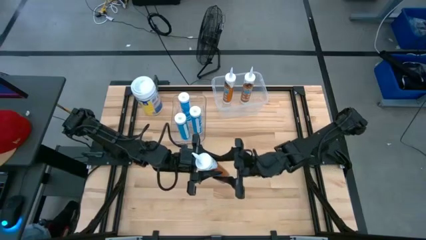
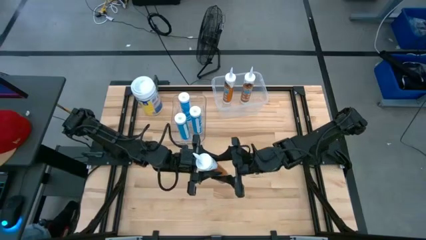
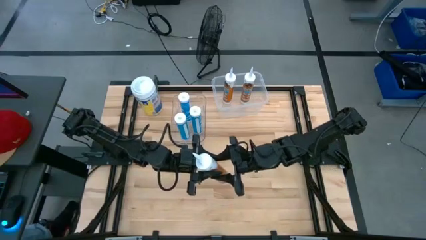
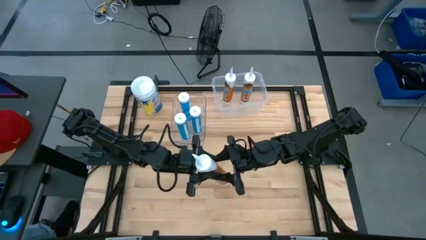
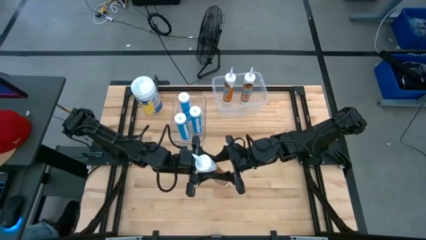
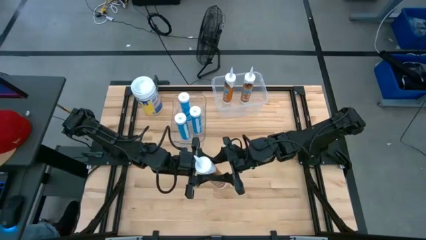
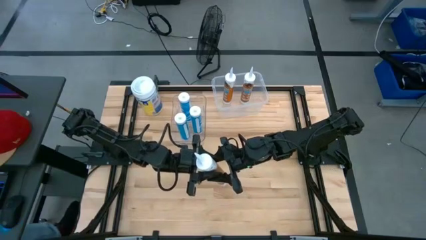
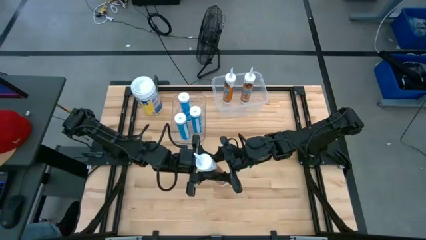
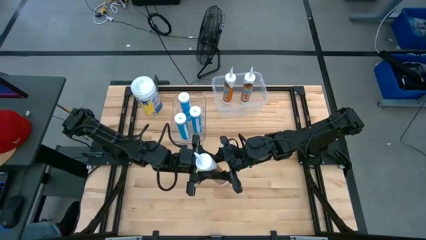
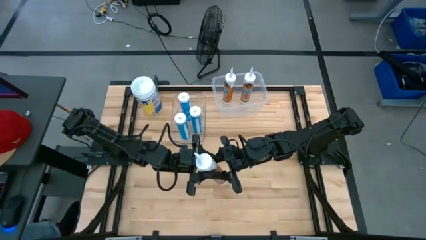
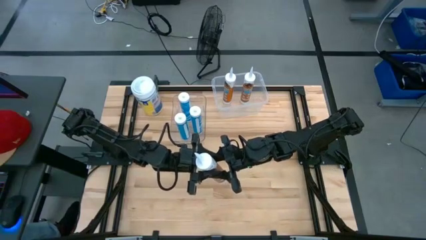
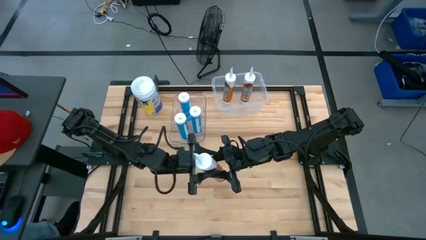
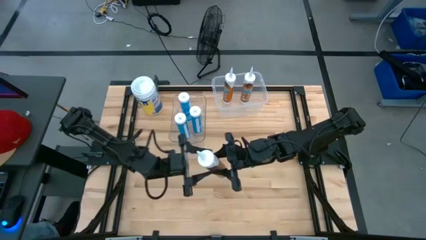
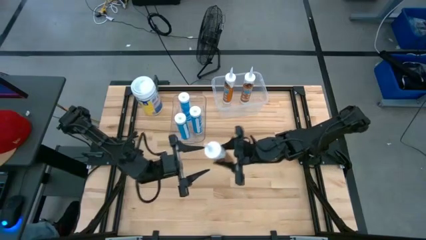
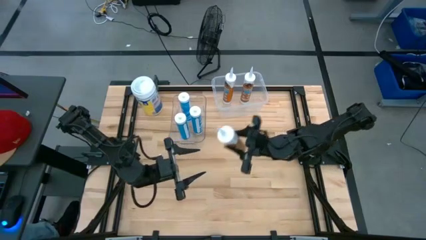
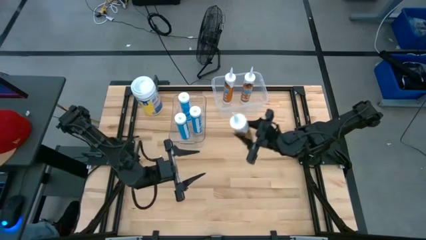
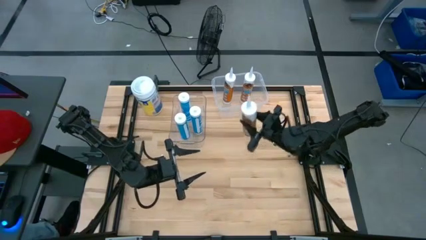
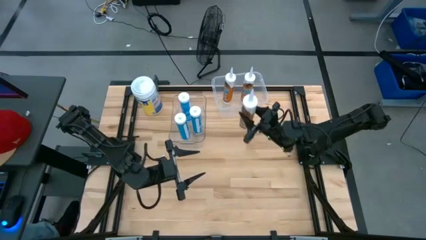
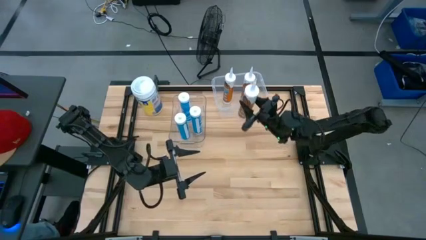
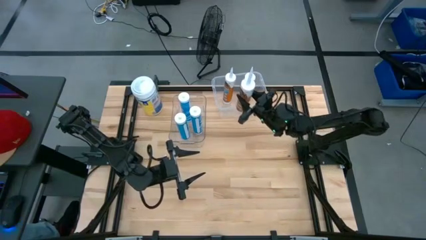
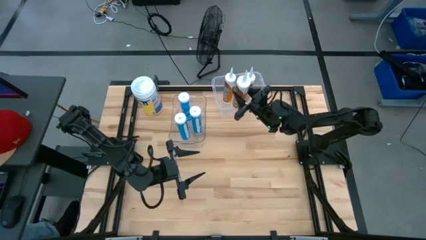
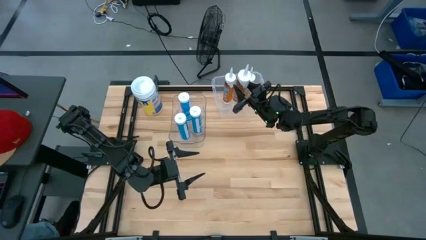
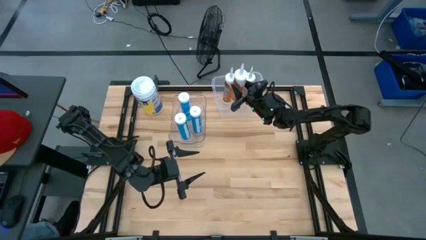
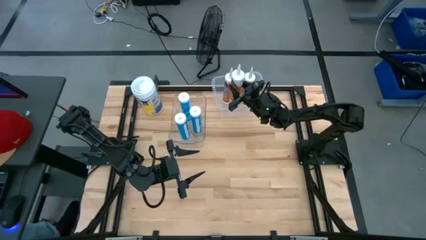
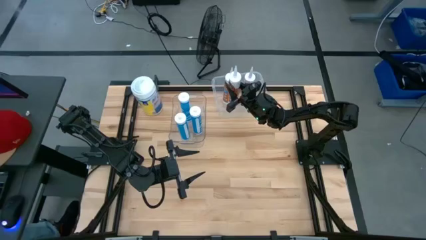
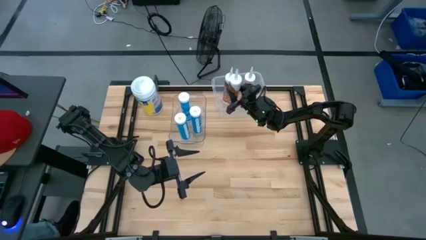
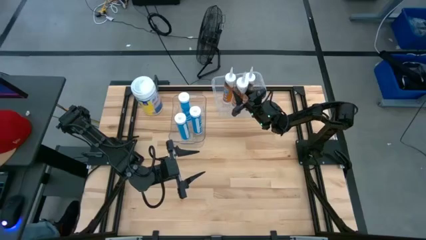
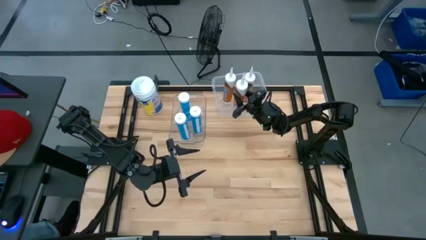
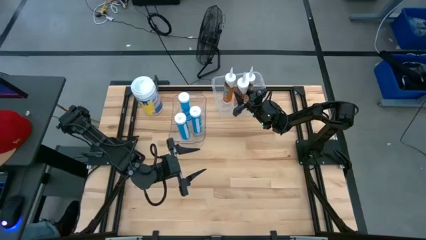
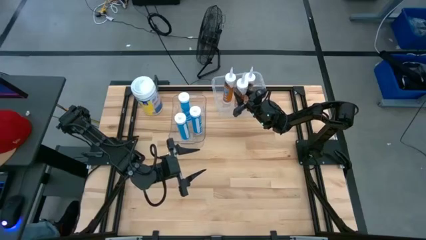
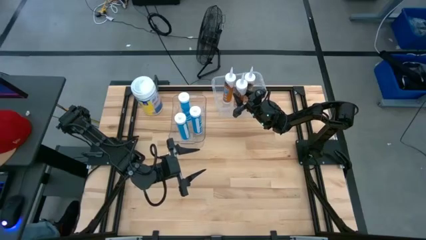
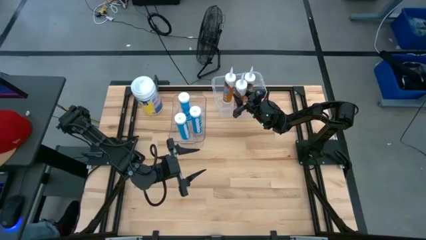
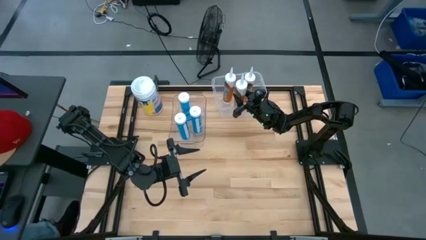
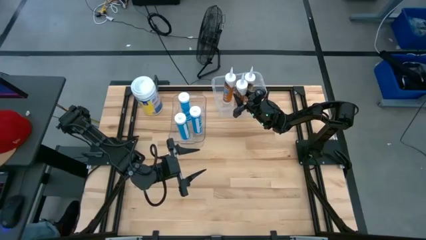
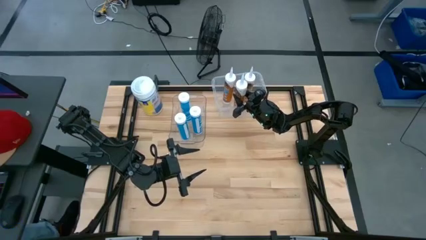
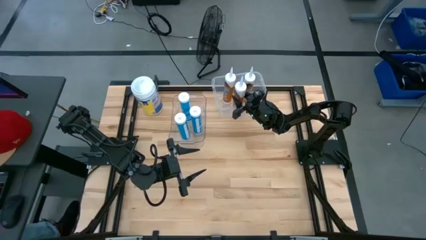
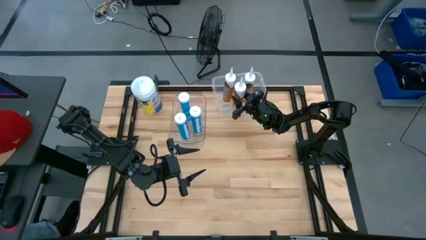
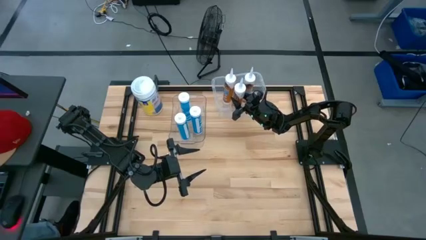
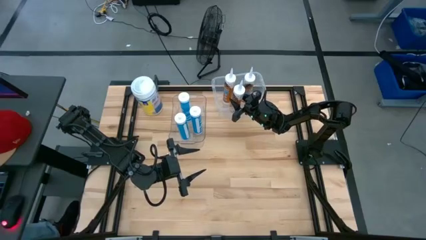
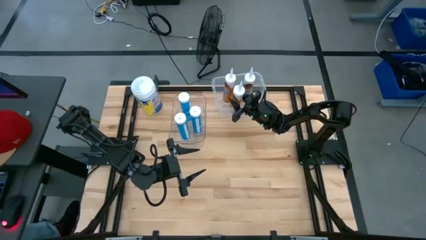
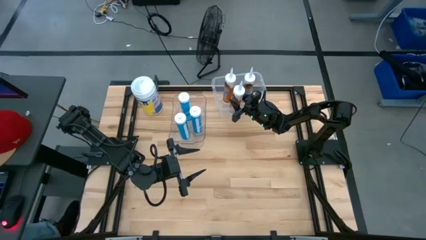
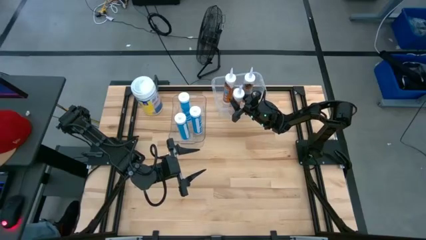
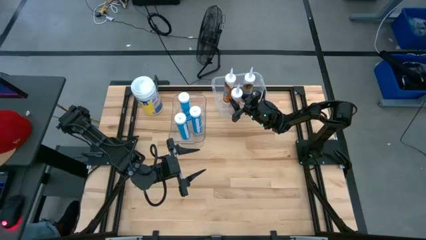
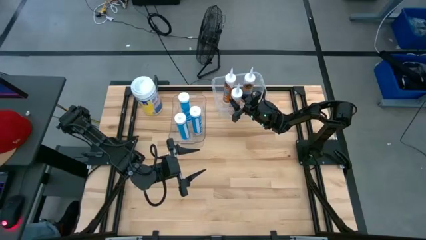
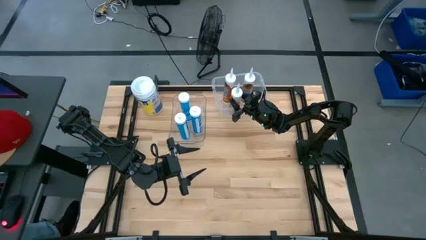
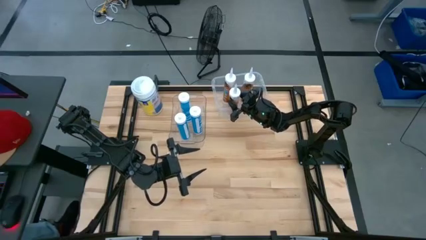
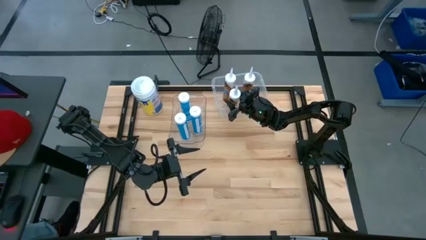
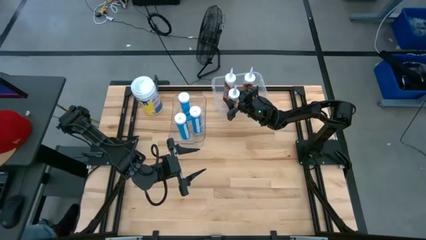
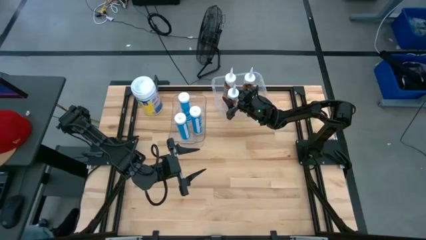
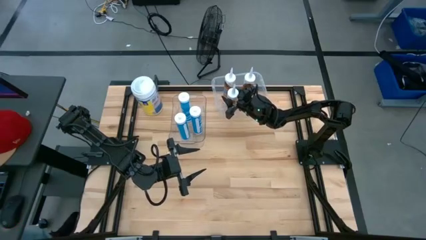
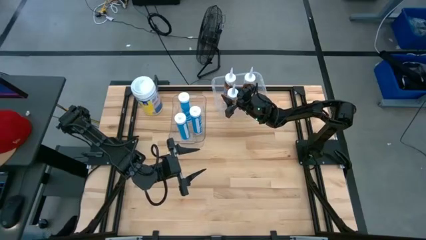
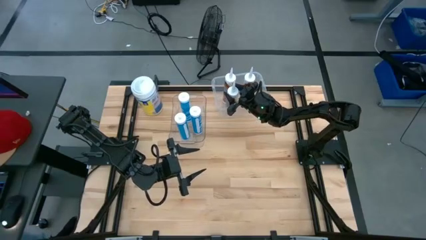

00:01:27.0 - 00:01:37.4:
Task: Pick & place silicon tubes, Sealant and Lysol wipes
Put the orange sealant into the white bin

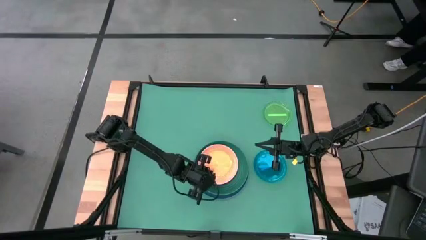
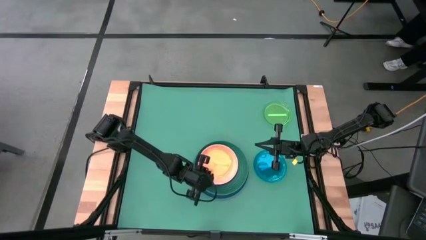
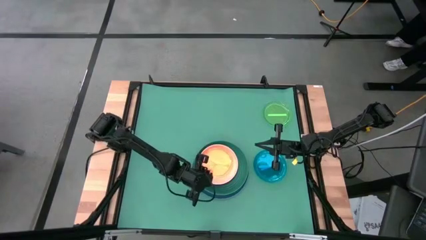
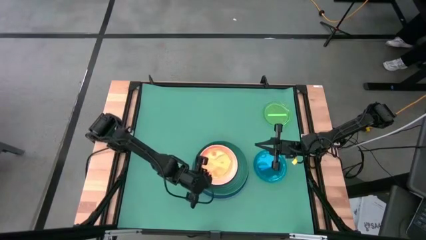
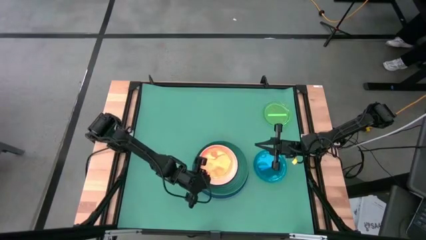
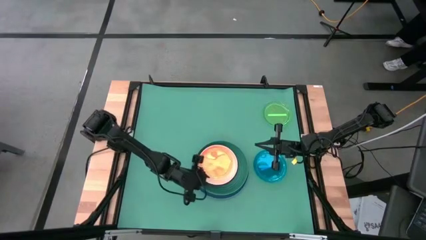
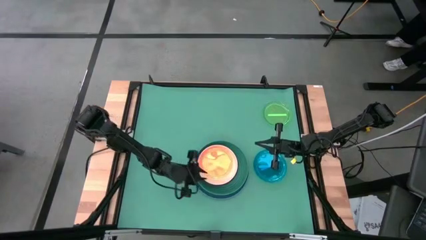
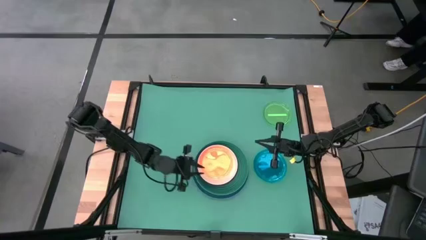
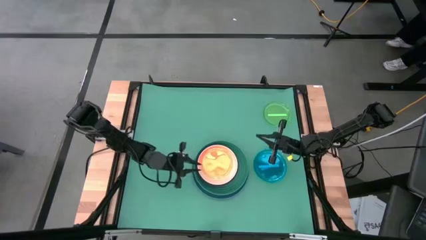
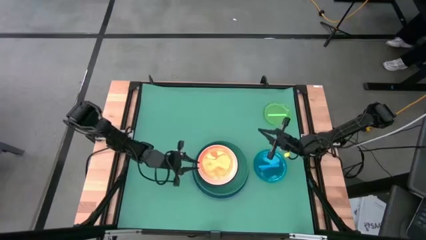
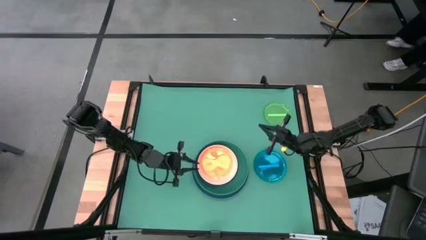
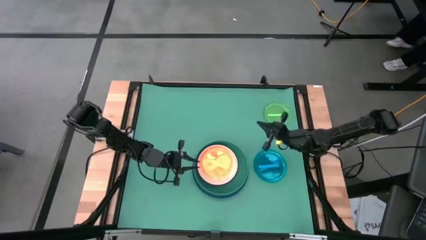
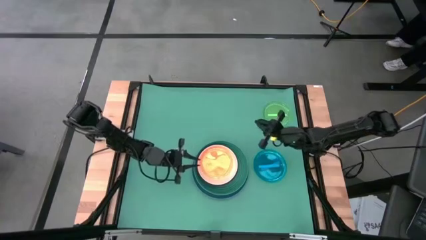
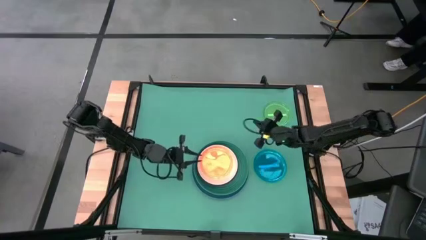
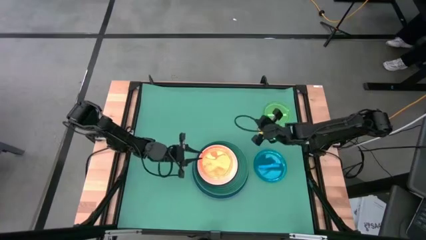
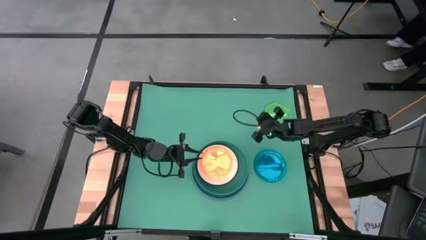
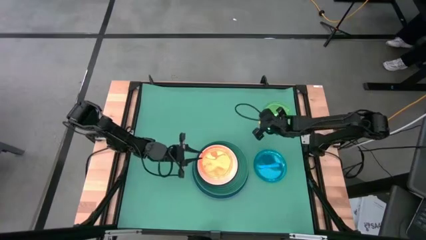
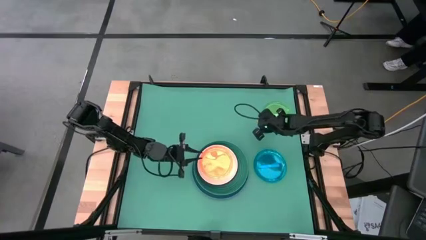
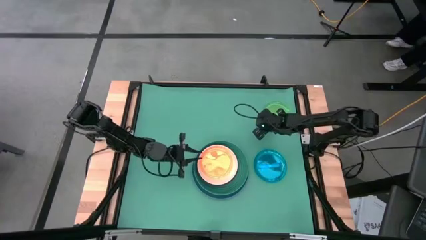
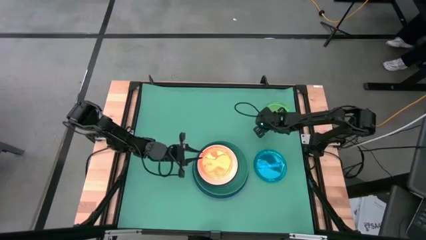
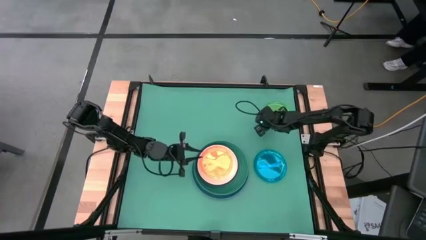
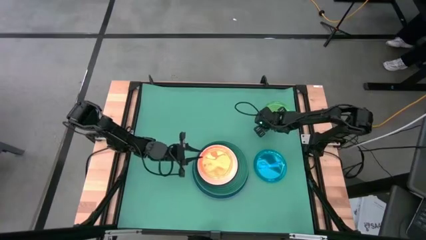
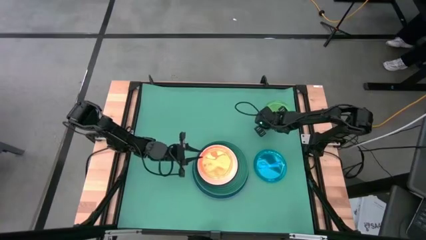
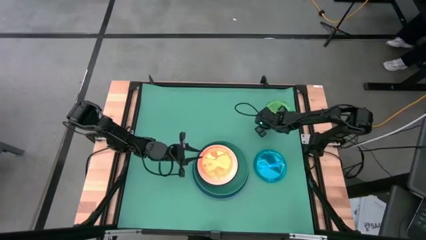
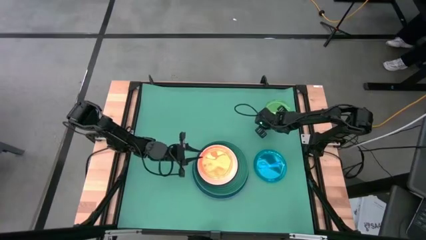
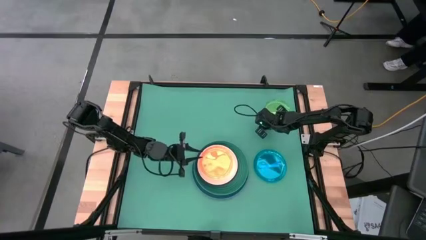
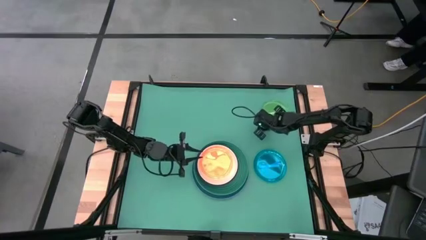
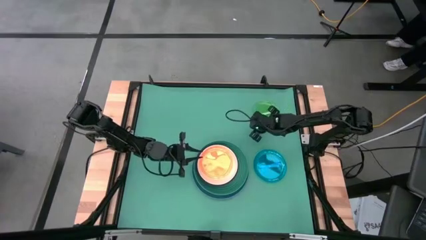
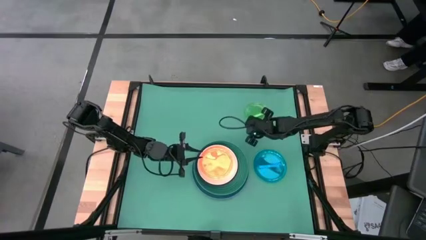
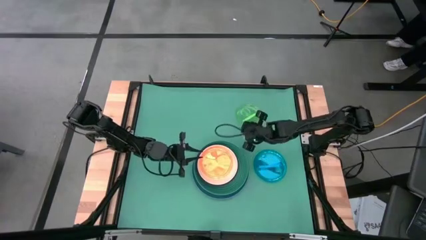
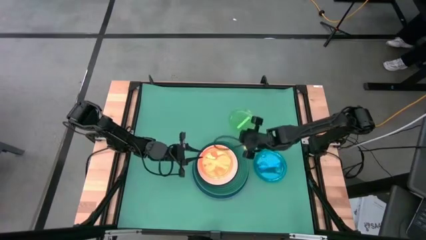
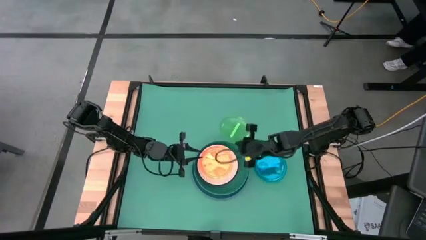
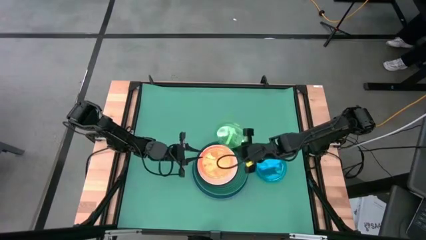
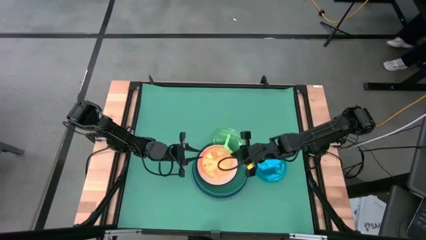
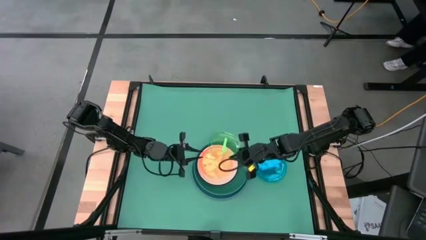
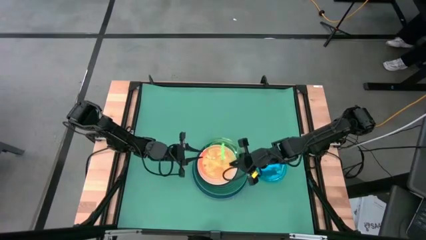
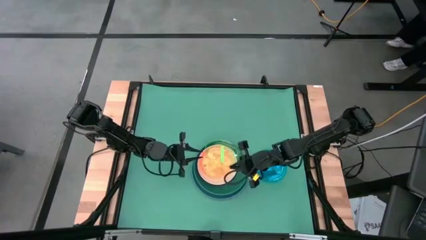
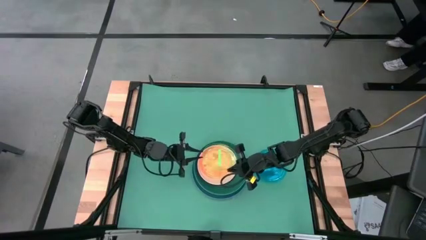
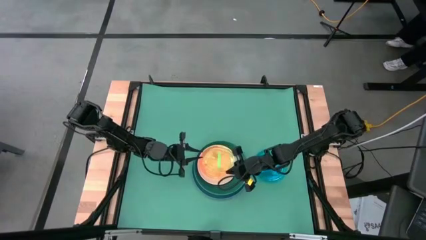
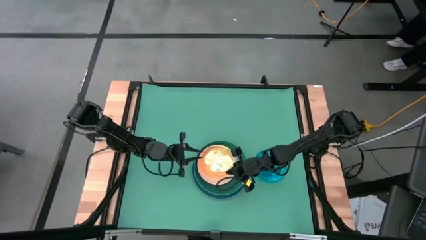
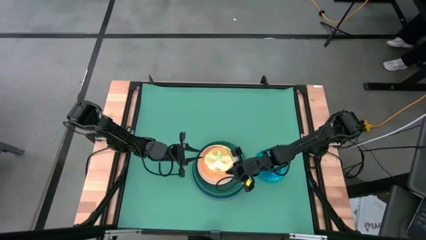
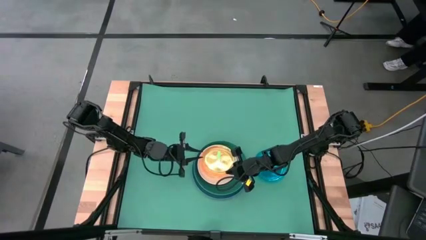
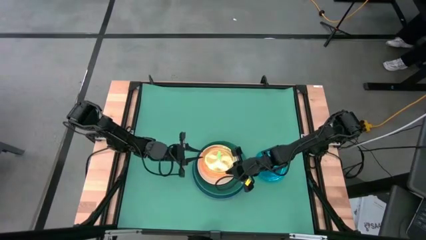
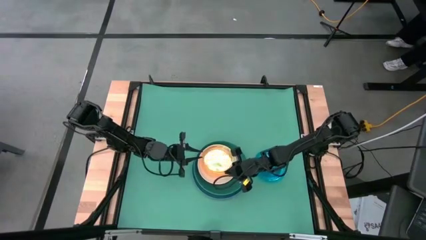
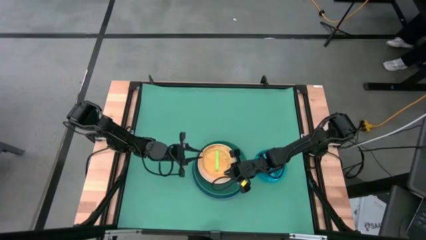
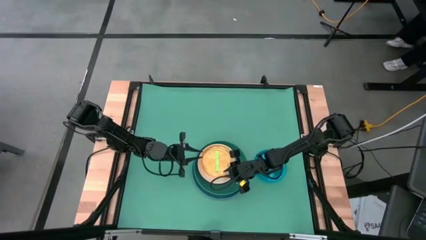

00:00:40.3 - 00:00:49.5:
Task: Stack plastic plates
Stack the transparent light green plate on top of the orange plate
